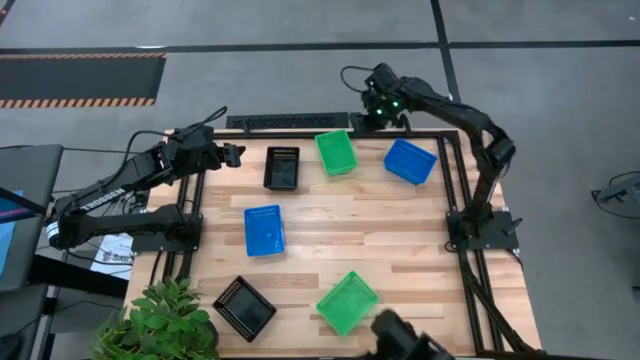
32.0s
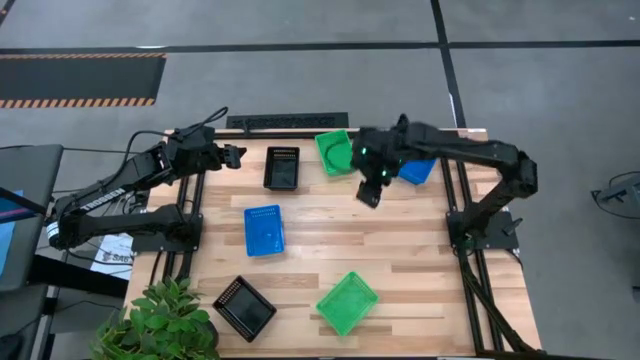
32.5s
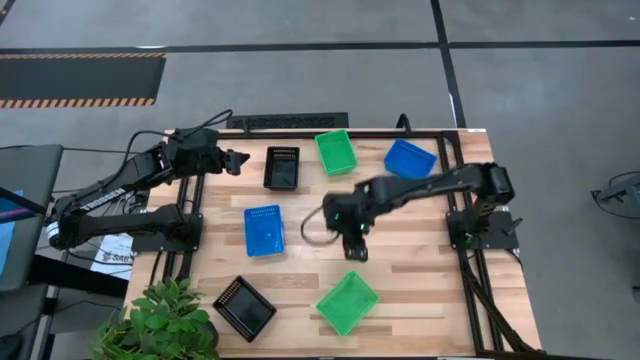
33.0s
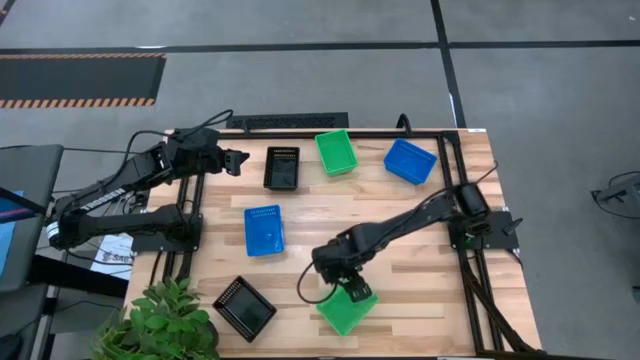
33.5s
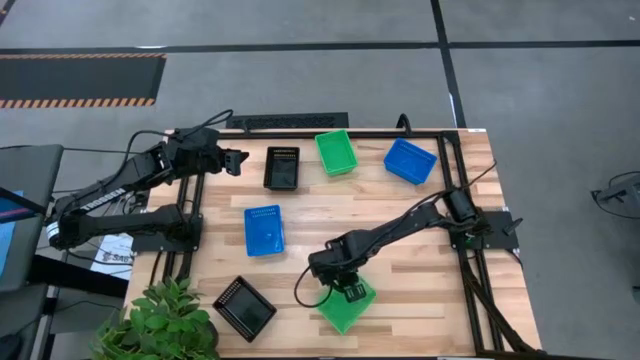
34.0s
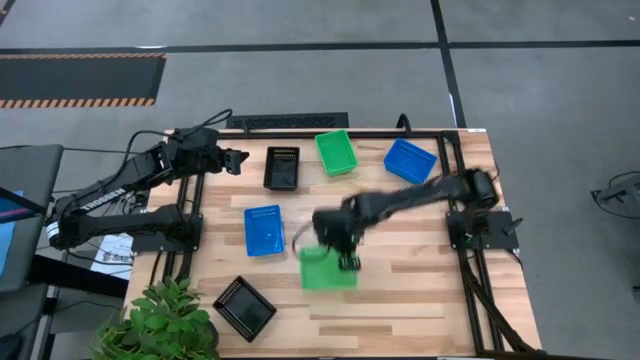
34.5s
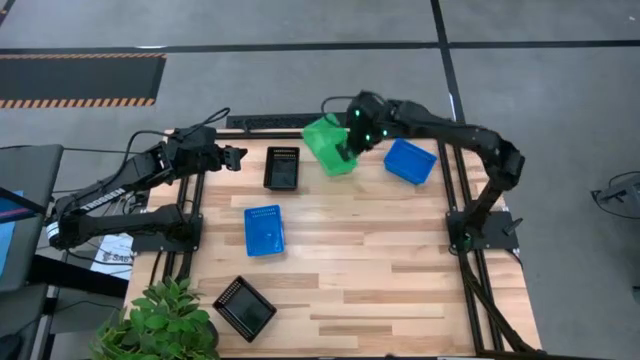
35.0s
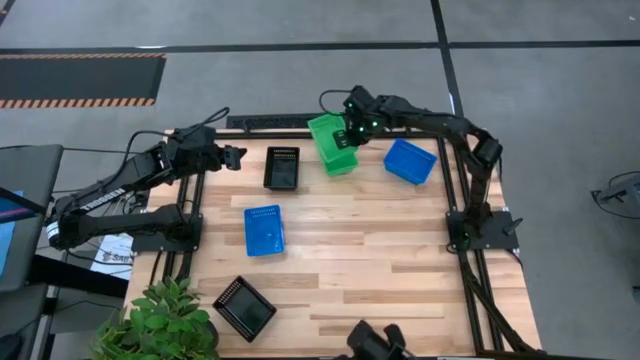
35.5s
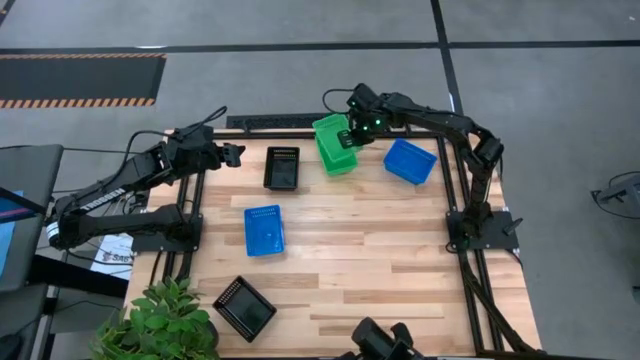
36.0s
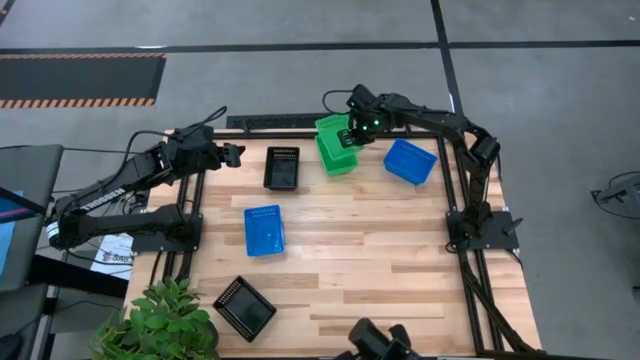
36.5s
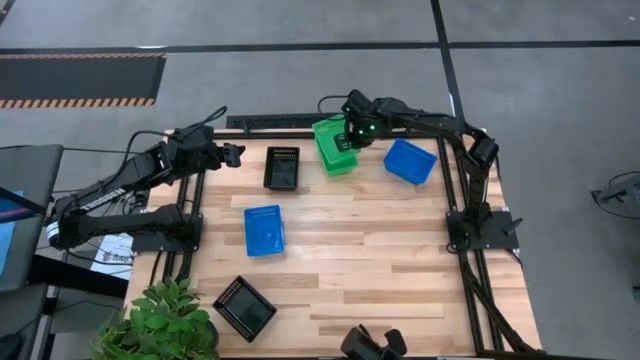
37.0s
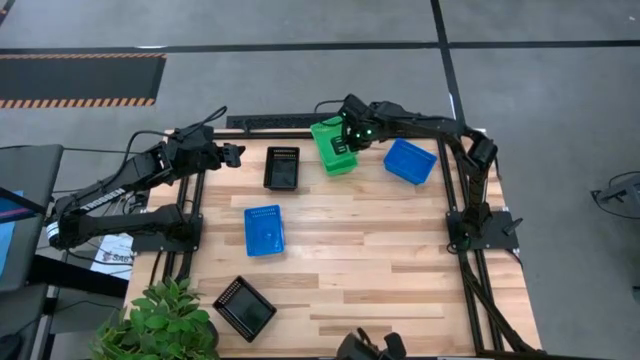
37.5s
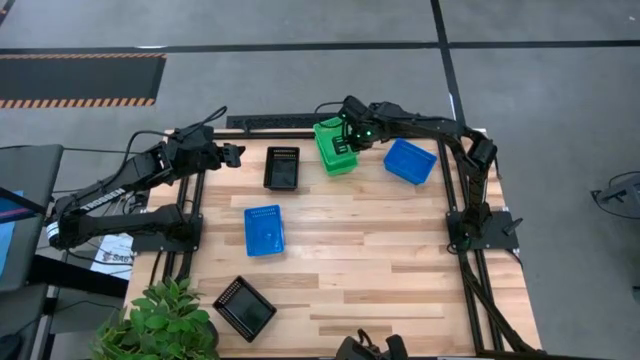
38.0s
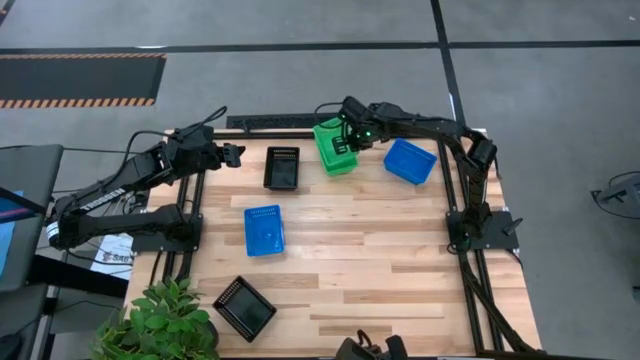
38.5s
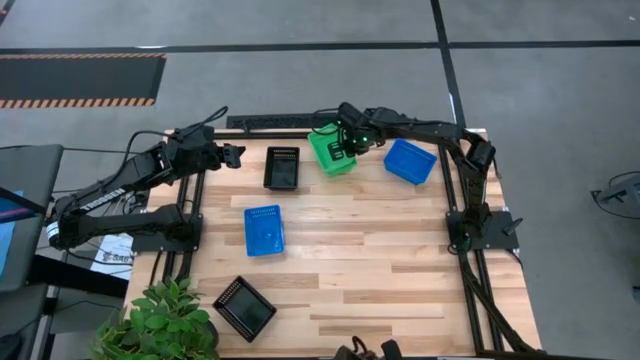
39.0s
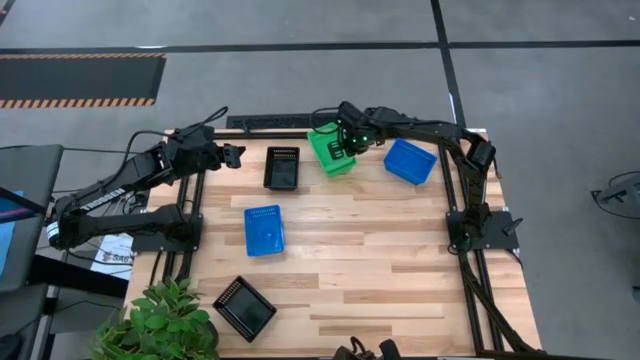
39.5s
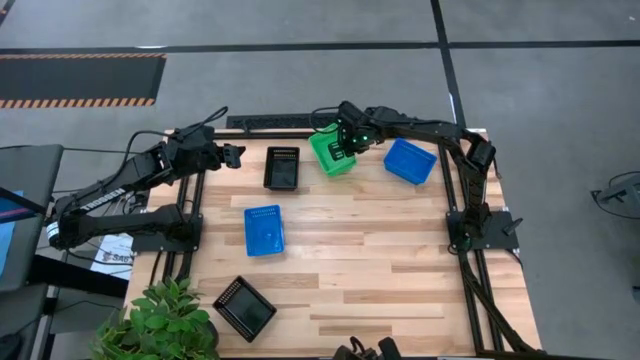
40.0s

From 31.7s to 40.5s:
Stack the green bin on the stacked green bin

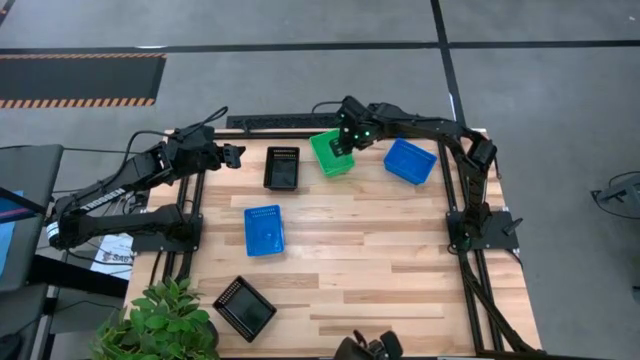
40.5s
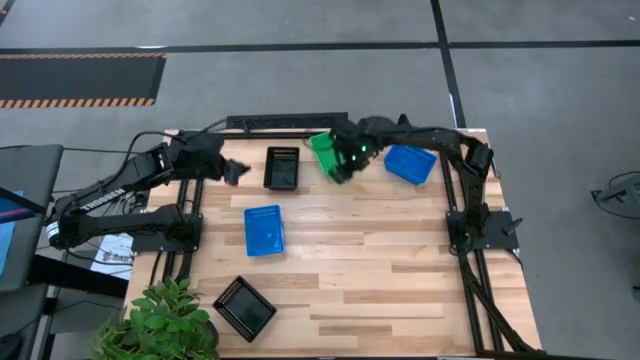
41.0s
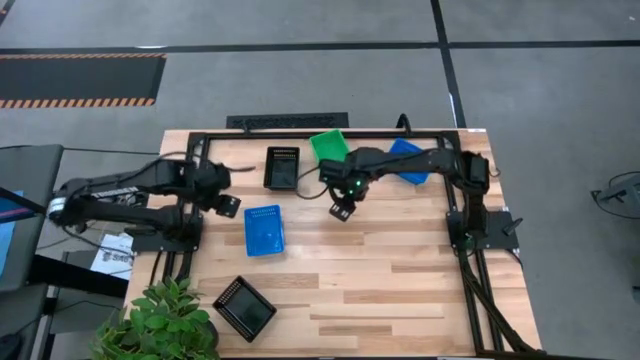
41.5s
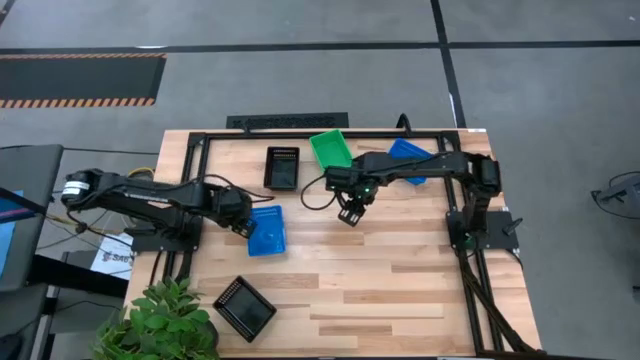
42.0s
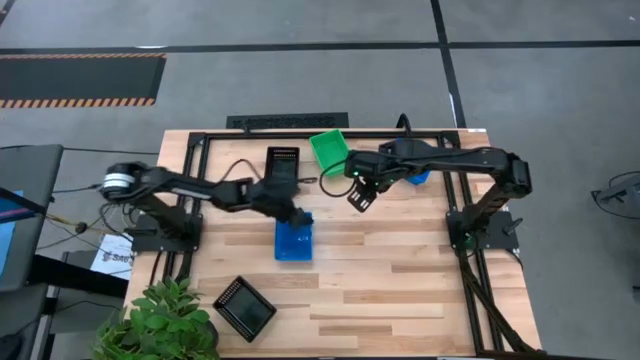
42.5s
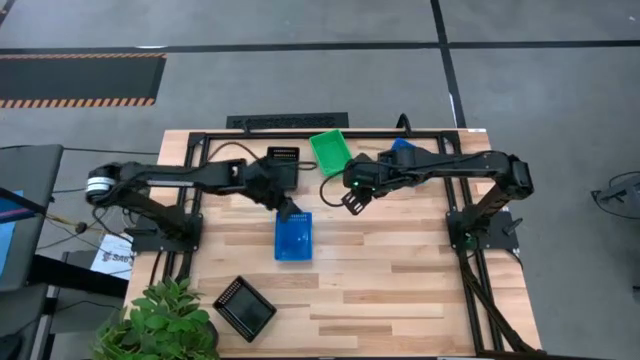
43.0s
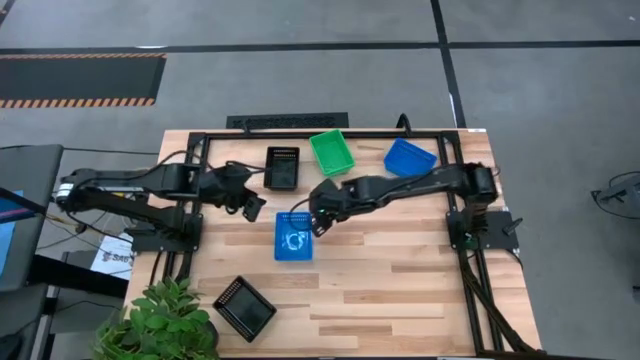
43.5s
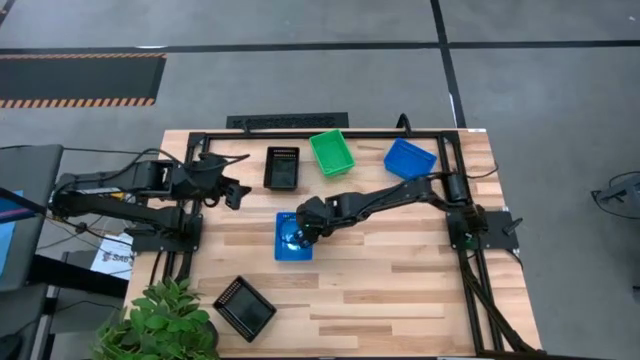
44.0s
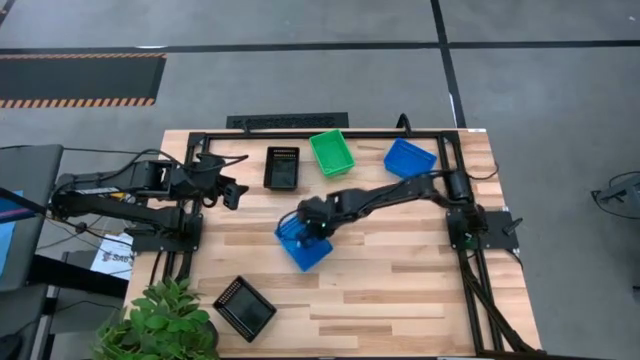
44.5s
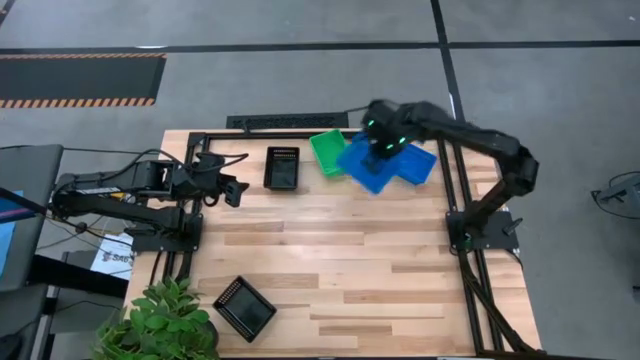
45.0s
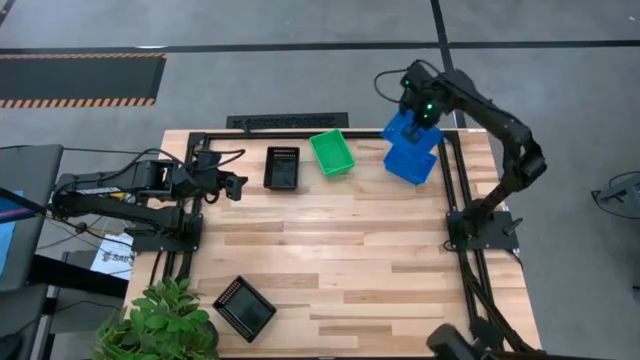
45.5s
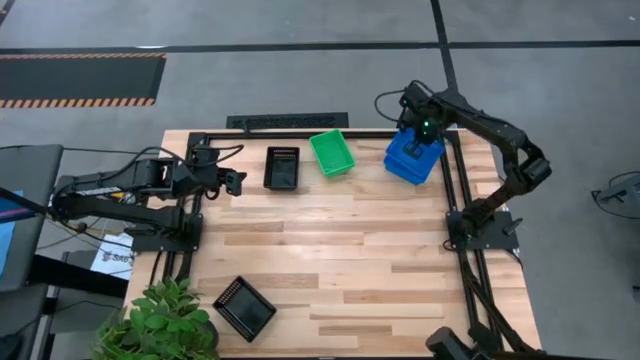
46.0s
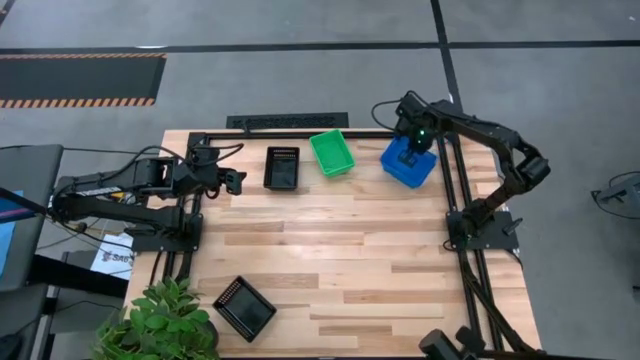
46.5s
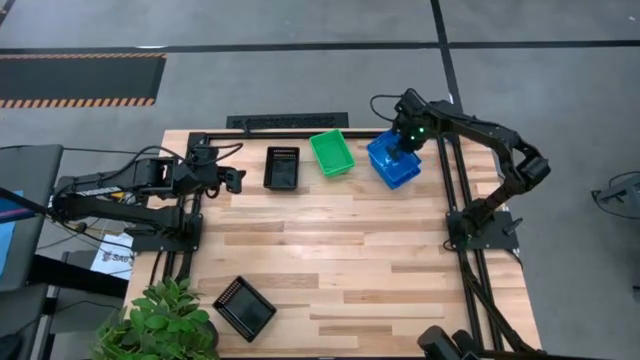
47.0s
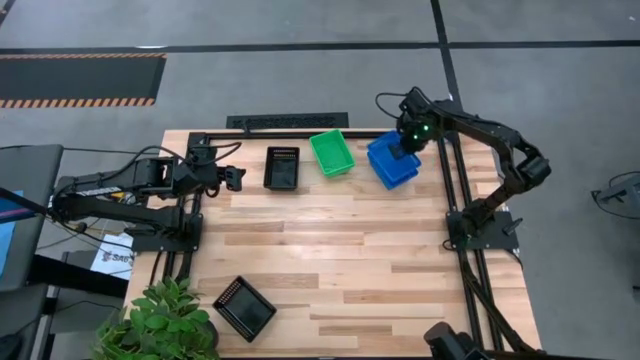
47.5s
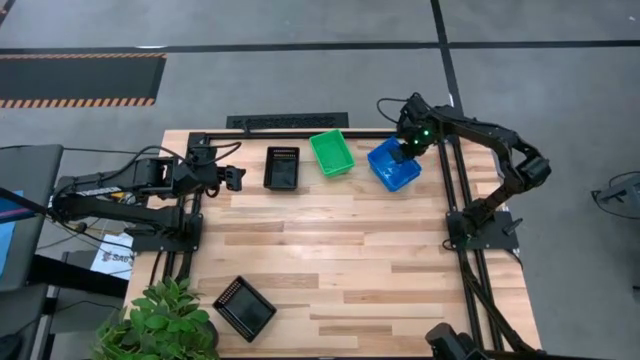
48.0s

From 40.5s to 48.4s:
Stack the blue bin on the stacked blue bin

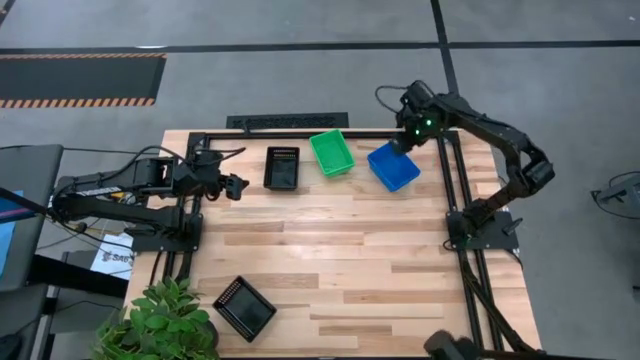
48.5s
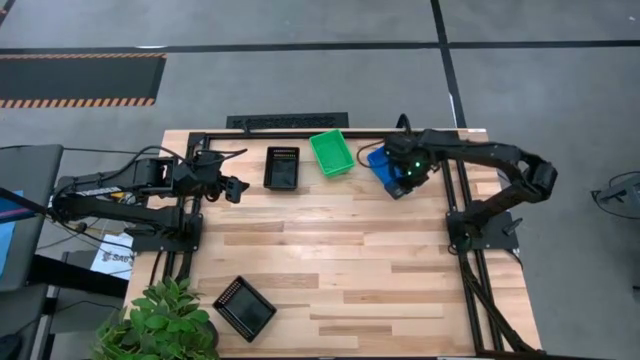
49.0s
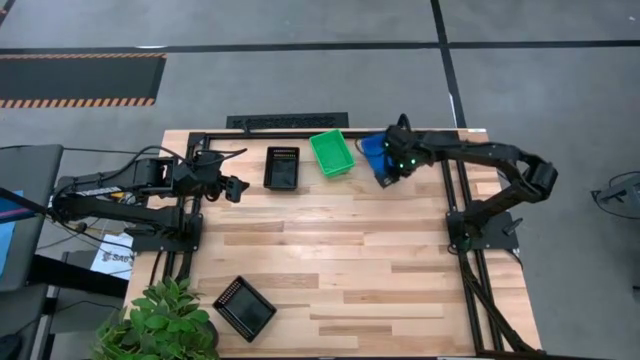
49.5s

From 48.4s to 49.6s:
Adjust the stacked blue bin to the top of the table

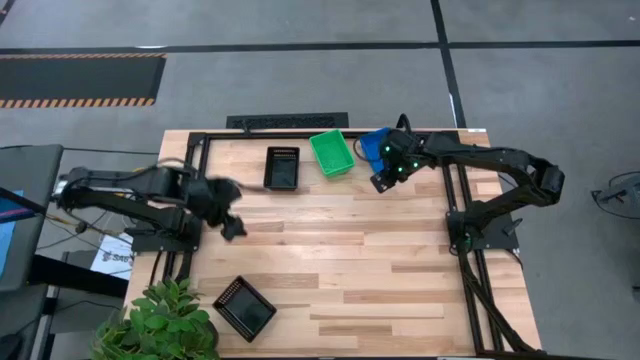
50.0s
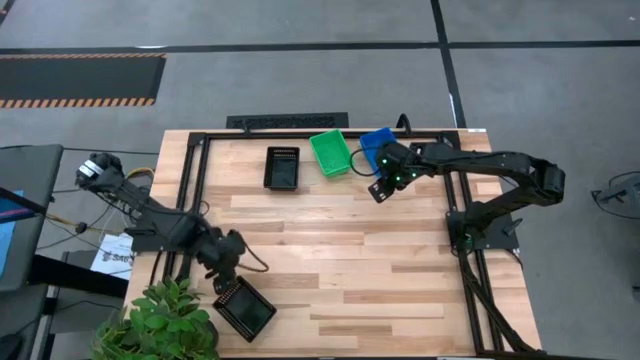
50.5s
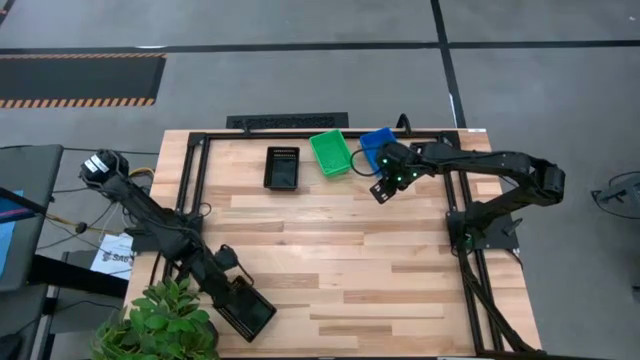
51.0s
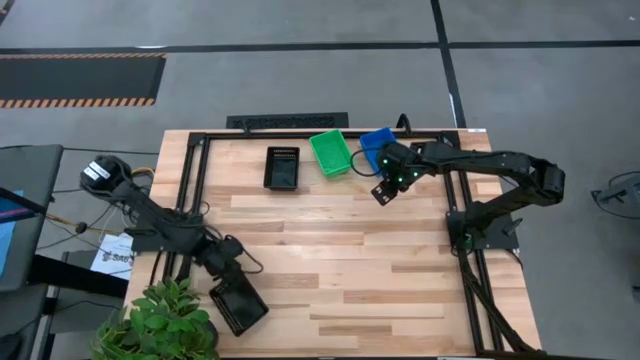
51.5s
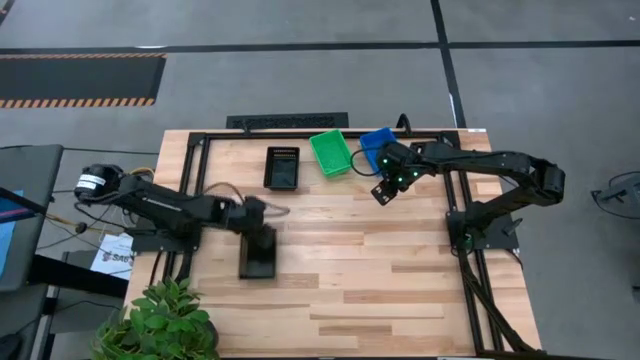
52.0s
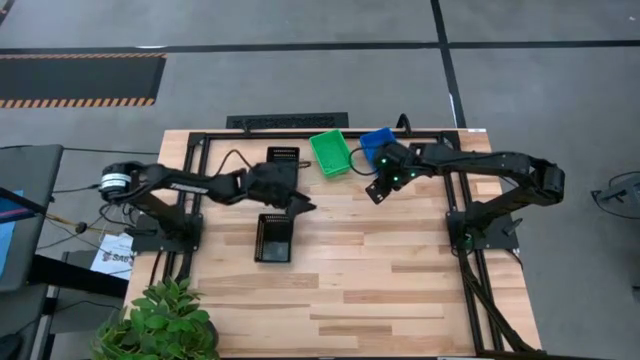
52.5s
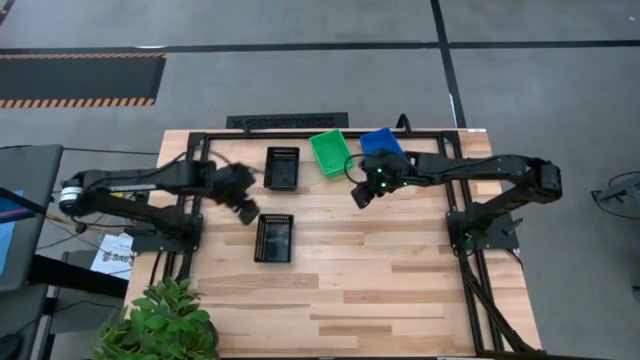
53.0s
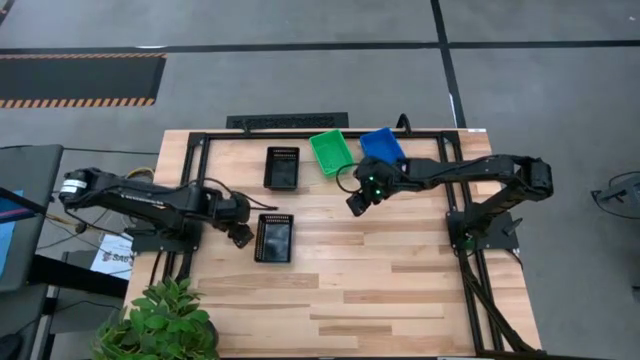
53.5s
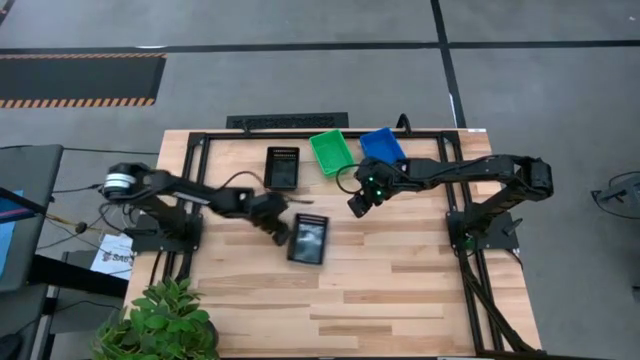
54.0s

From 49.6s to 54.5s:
Move the bottom black bin to the center of the table
